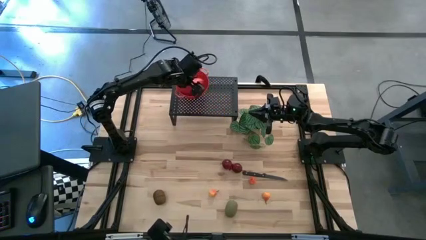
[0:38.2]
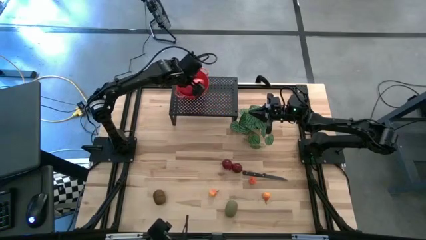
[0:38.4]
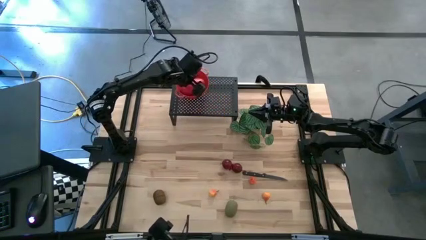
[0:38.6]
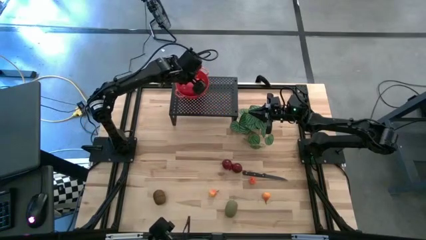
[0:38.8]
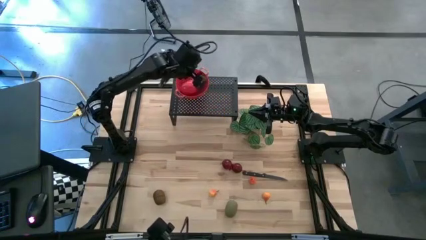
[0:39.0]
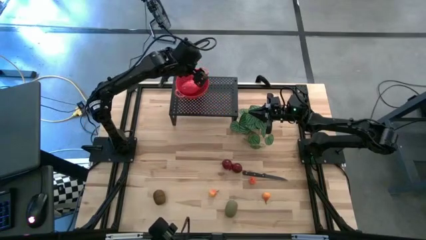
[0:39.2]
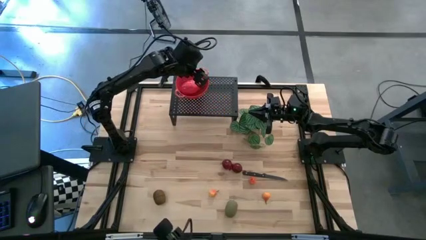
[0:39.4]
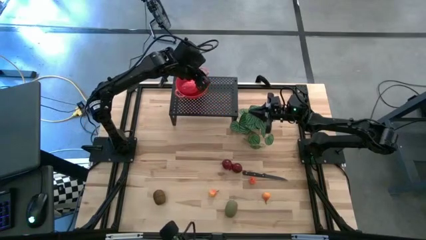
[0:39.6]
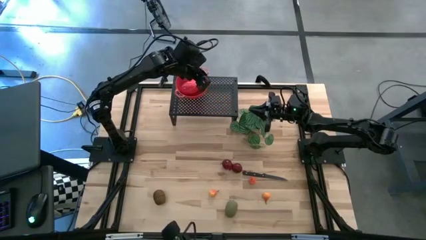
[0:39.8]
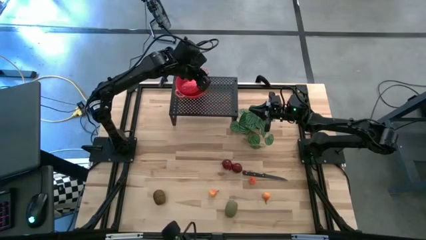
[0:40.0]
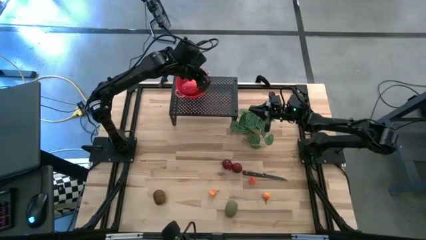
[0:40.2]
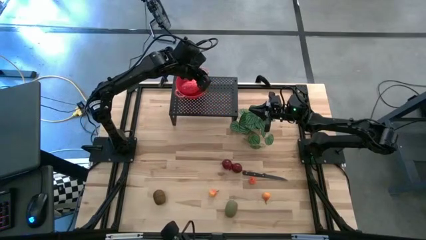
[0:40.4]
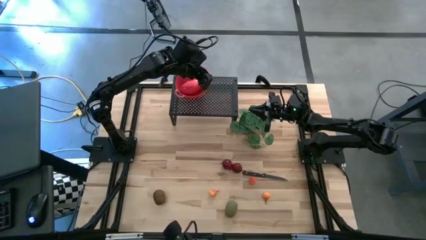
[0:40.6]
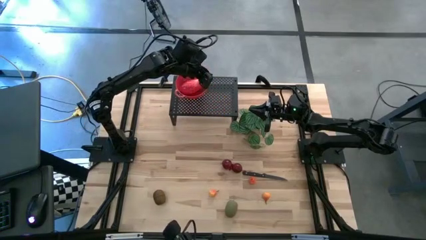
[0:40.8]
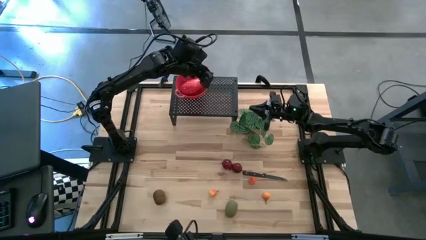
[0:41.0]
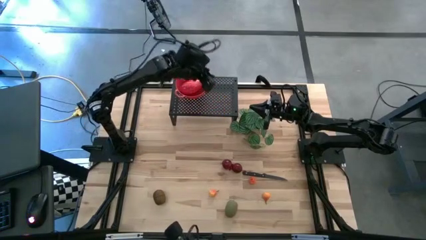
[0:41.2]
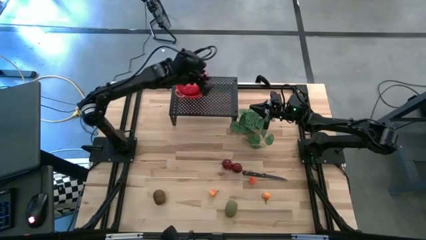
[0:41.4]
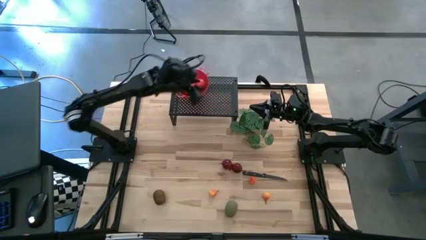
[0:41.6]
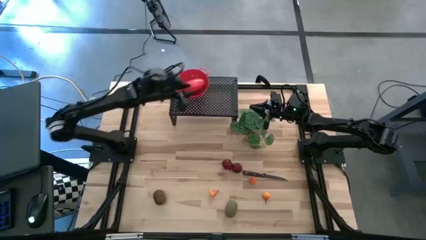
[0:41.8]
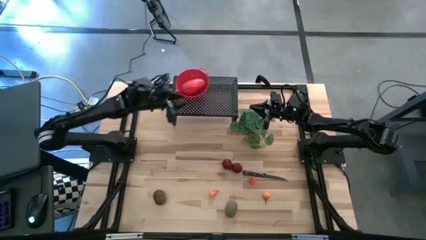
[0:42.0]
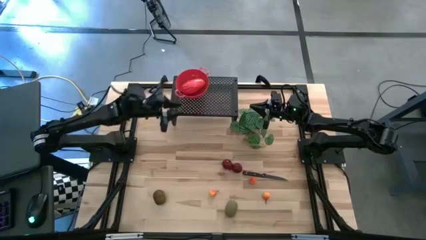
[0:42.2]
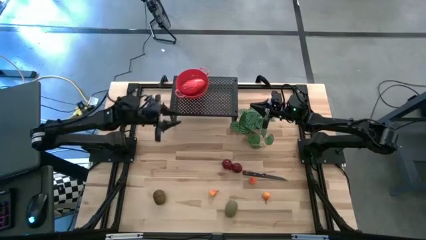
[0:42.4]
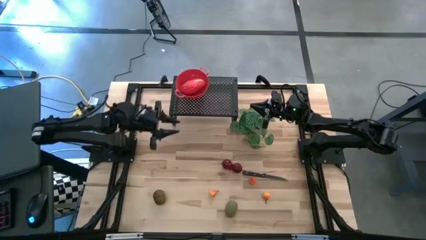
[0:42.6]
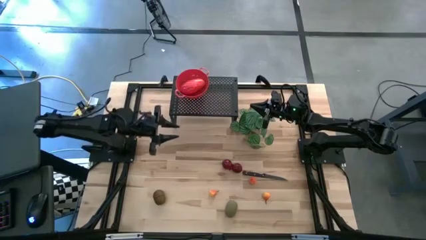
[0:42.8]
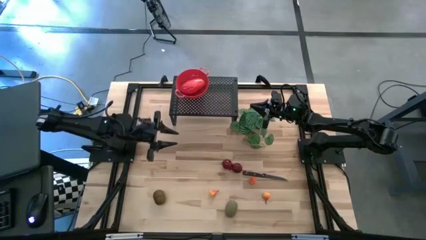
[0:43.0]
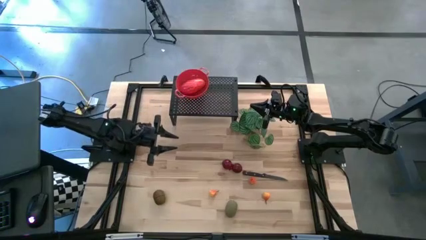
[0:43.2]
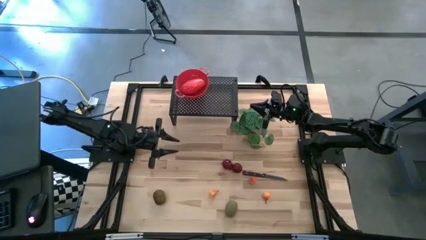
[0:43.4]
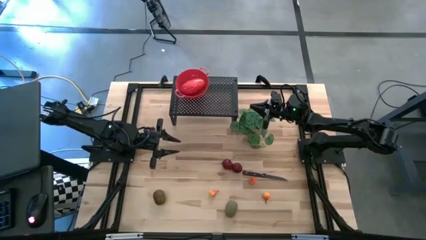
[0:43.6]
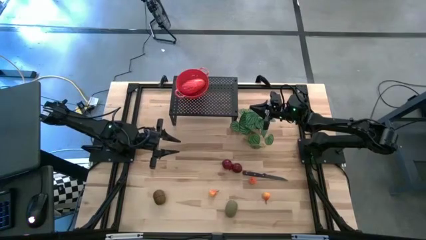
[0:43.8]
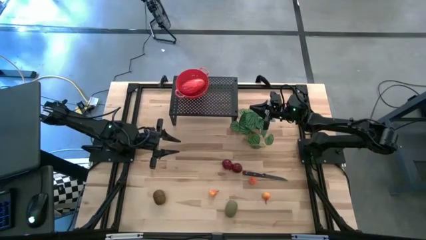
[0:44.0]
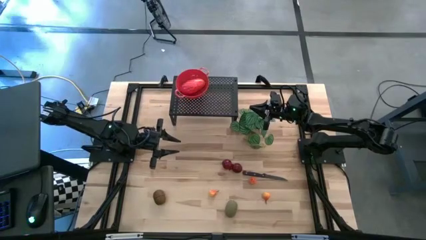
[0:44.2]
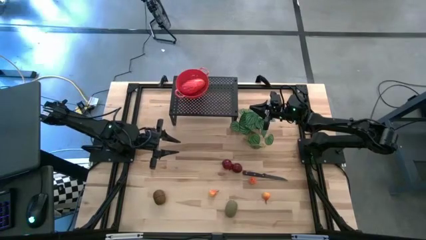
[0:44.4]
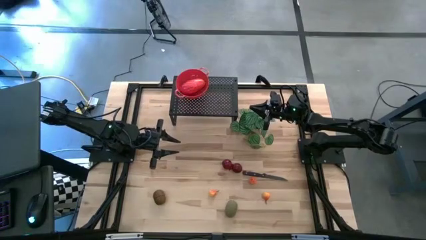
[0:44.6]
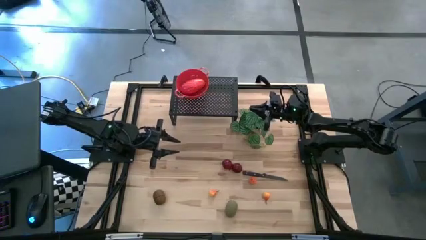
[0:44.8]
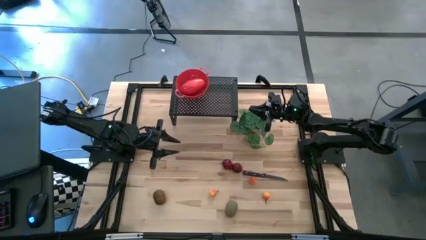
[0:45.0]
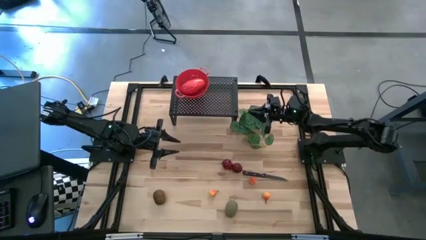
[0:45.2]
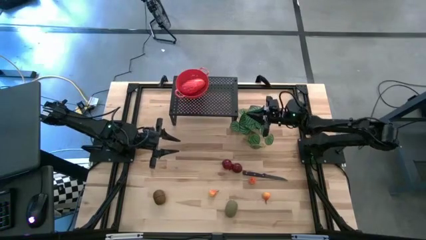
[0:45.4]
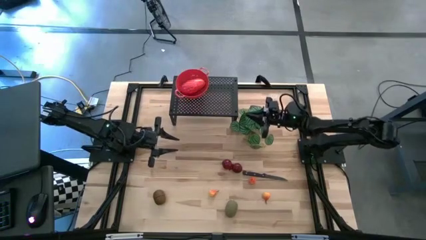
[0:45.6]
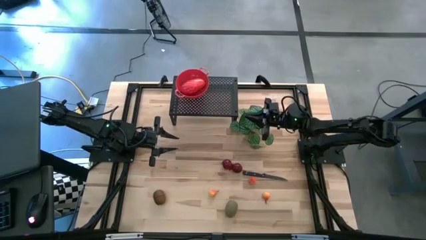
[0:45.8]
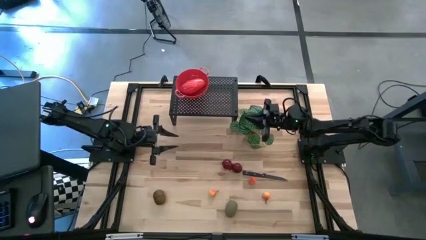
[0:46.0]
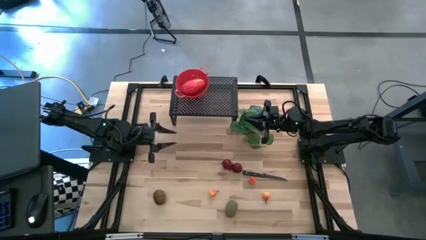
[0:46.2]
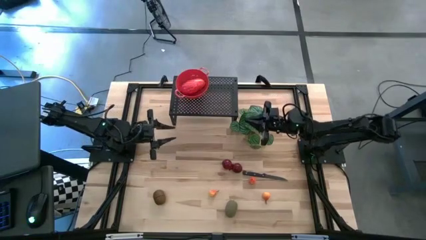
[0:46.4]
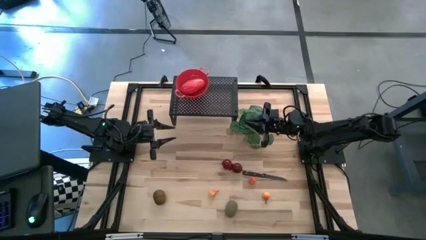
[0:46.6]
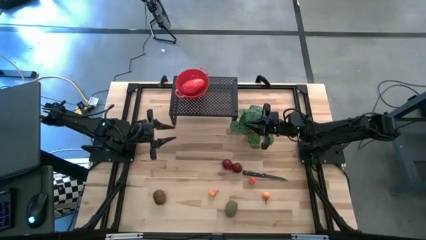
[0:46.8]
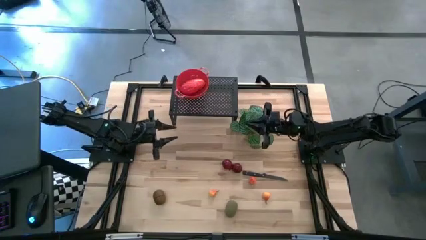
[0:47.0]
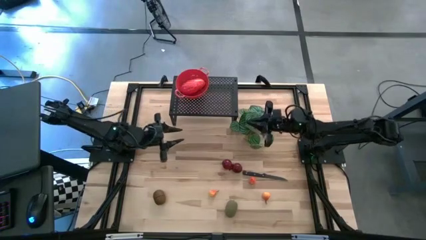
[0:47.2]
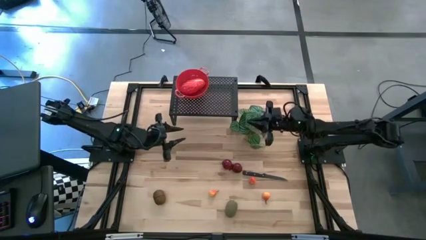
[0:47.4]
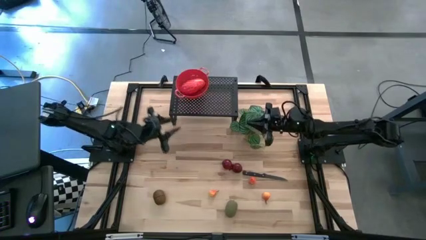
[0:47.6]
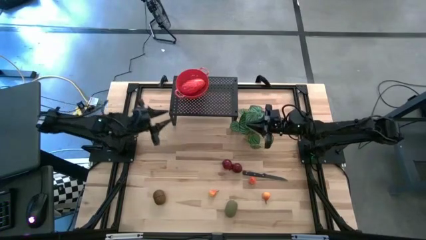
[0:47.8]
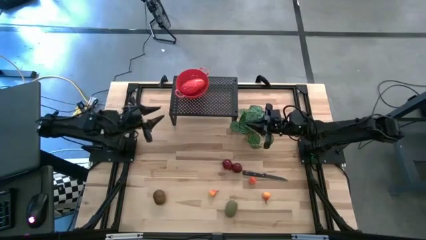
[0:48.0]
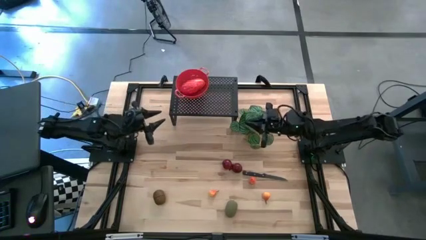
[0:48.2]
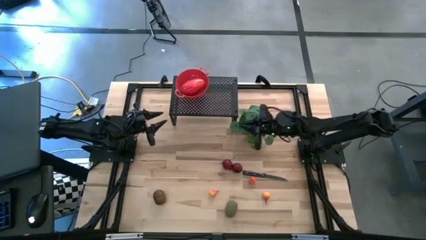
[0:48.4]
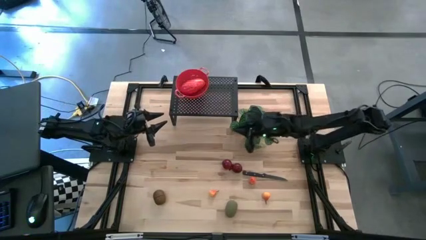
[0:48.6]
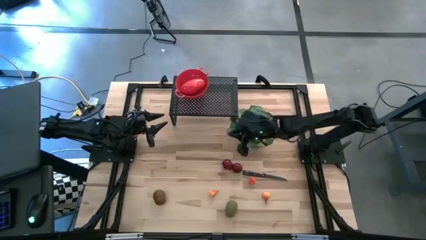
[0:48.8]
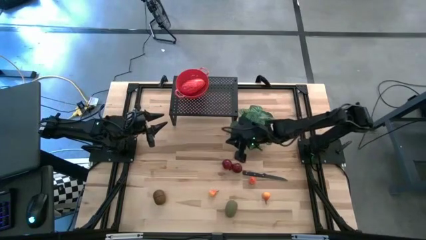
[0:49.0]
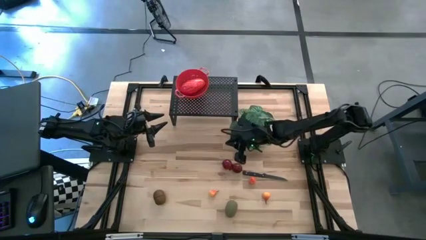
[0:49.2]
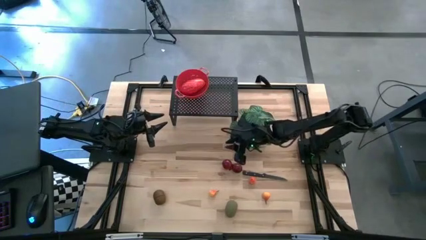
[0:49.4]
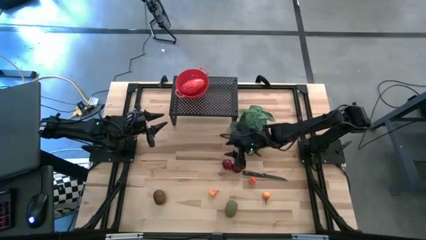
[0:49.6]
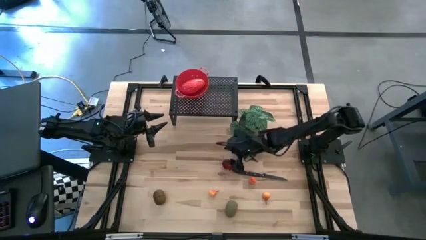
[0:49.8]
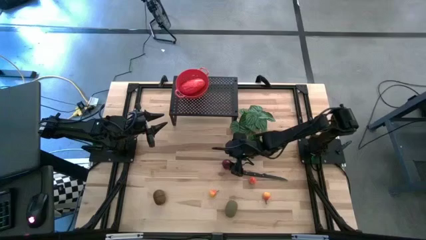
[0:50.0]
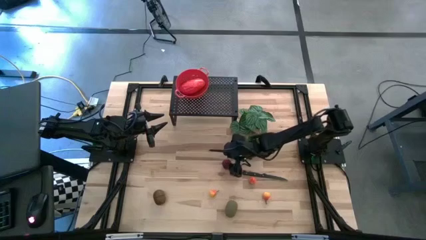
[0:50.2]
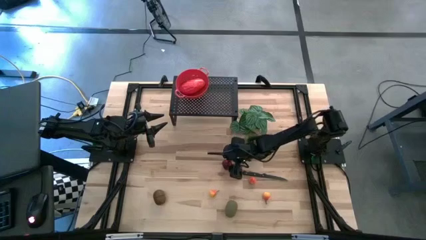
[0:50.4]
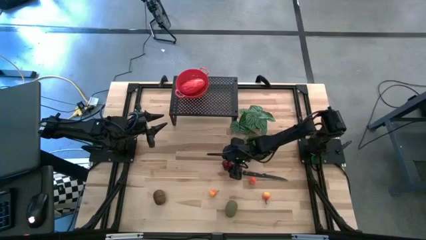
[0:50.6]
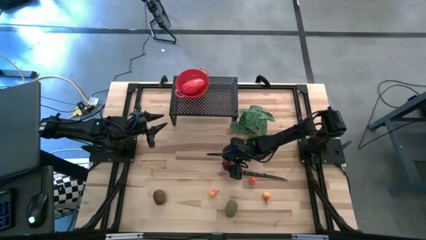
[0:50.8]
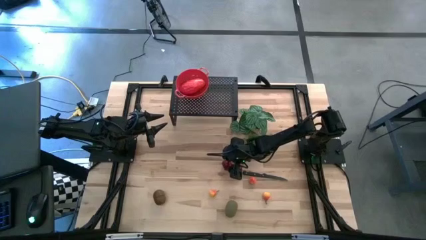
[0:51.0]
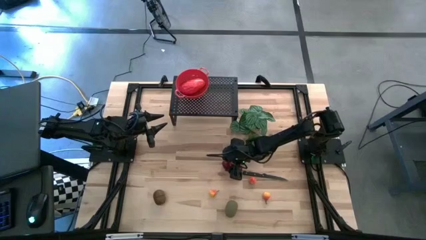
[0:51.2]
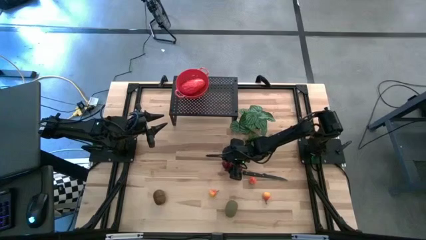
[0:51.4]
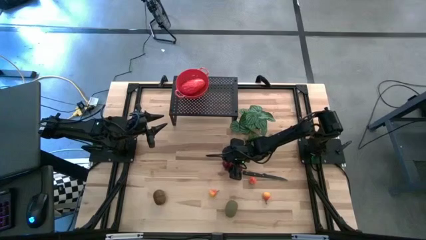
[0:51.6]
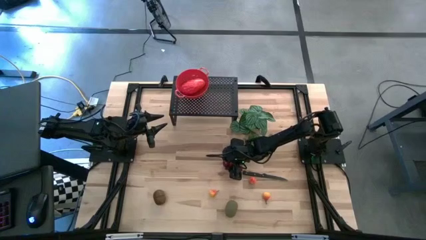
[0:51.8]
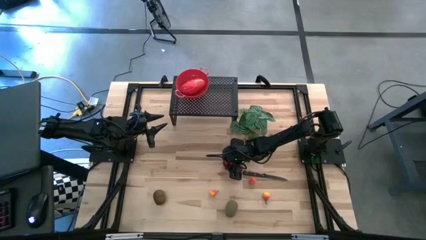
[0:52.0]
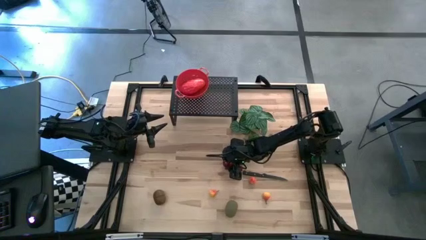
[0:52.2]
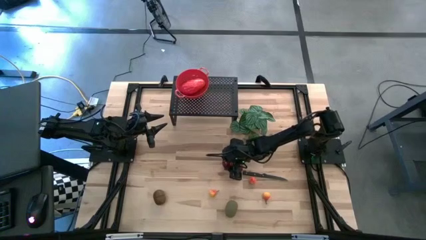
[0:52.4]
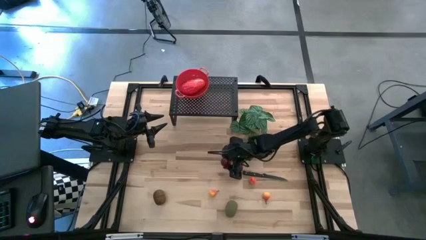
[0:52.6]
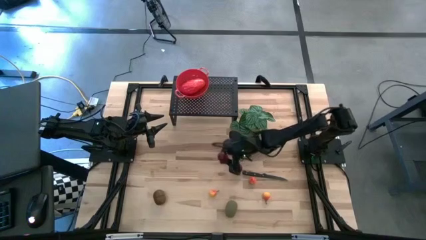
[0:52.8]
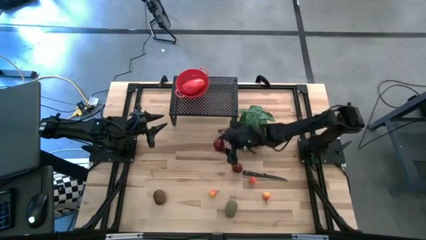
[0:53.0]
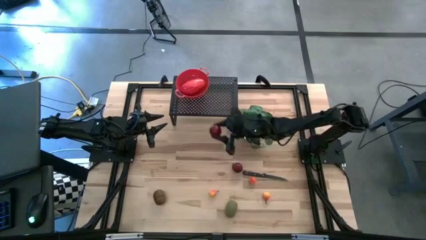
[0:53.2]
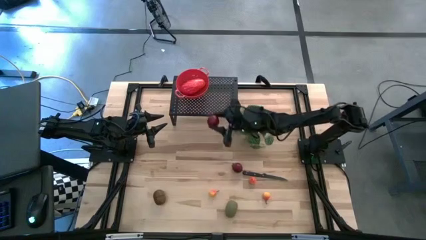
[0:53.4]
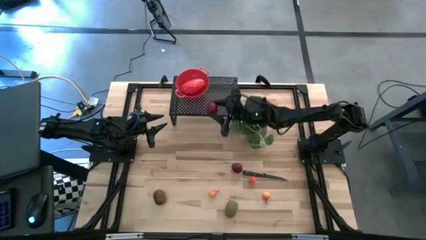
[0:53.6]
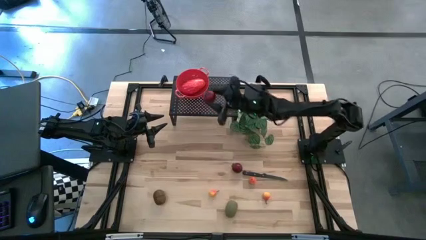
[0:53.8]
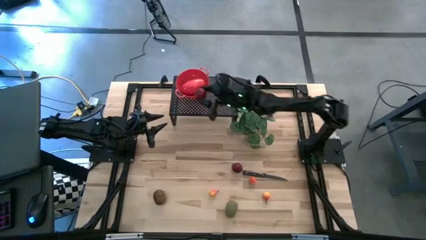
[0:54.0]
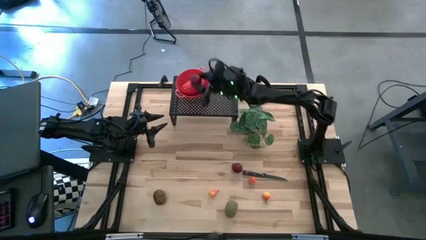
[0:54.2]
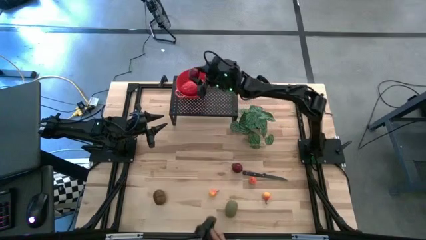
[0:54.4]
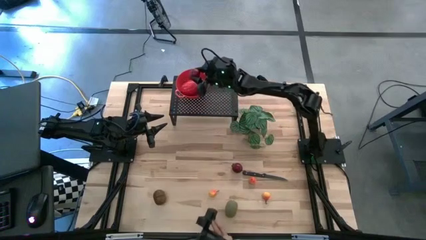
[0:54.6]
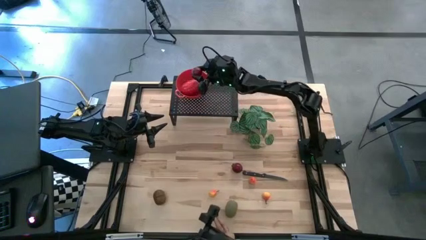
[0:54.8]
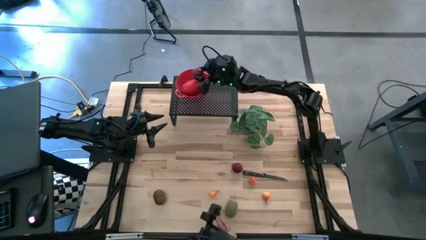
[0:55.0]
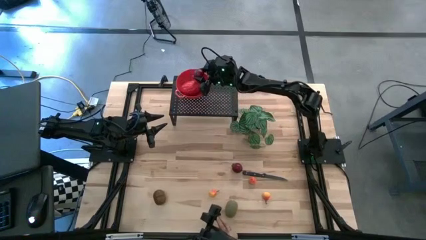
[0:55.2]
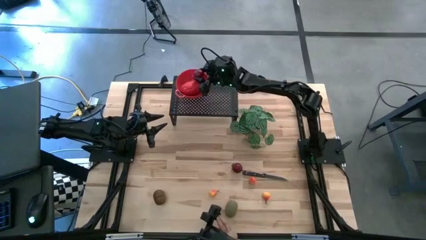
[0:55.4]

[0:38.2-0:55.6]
Task: Pick & Place Fruit
Put the left red pomegranate in the red strainer bowl on the shelf
